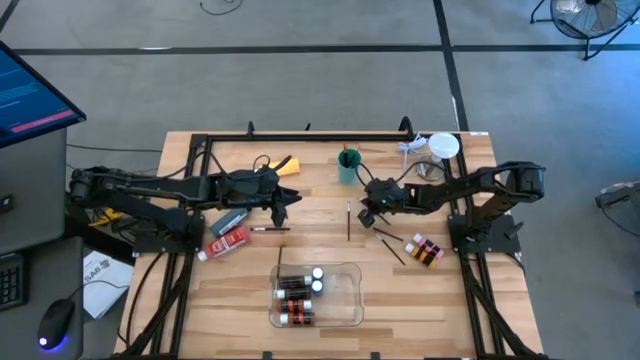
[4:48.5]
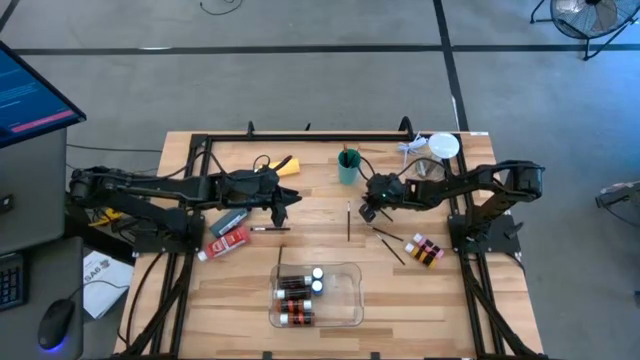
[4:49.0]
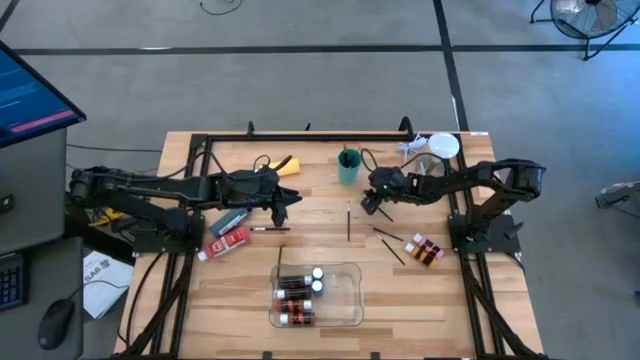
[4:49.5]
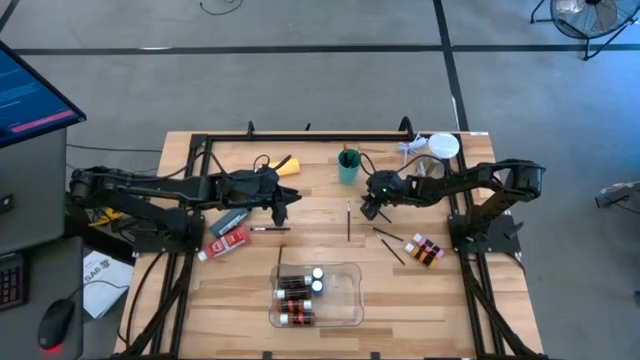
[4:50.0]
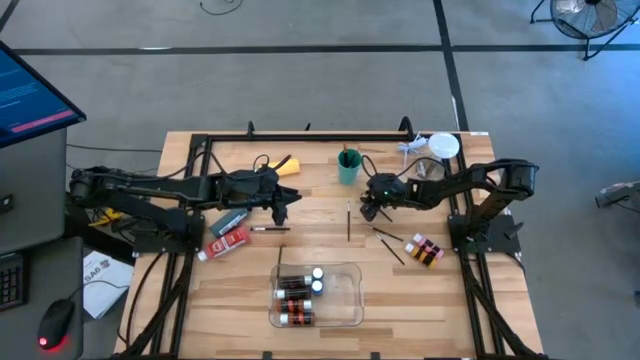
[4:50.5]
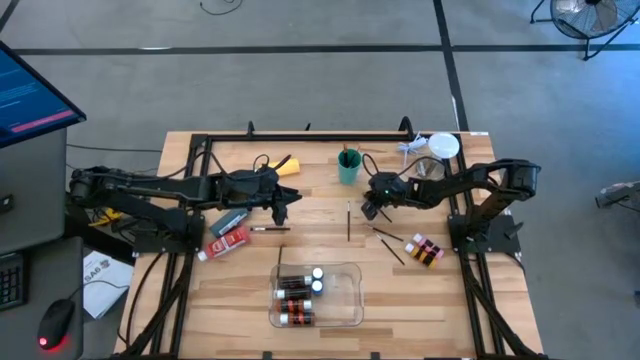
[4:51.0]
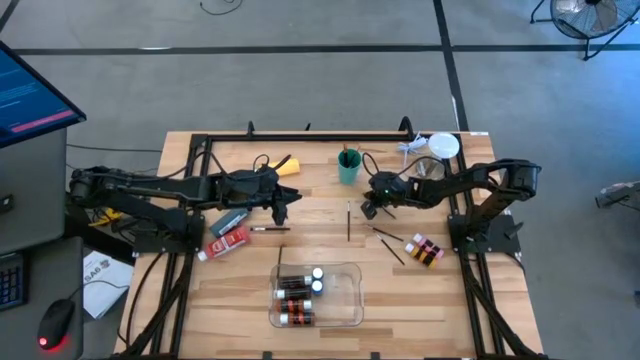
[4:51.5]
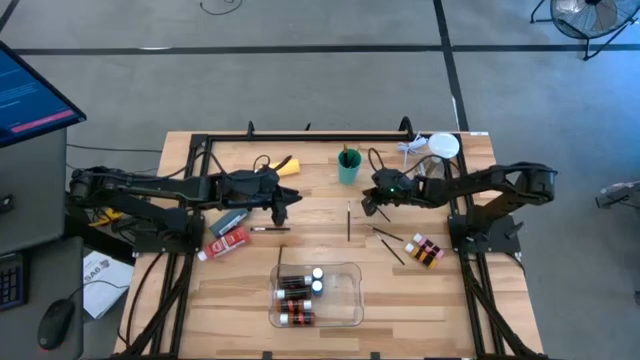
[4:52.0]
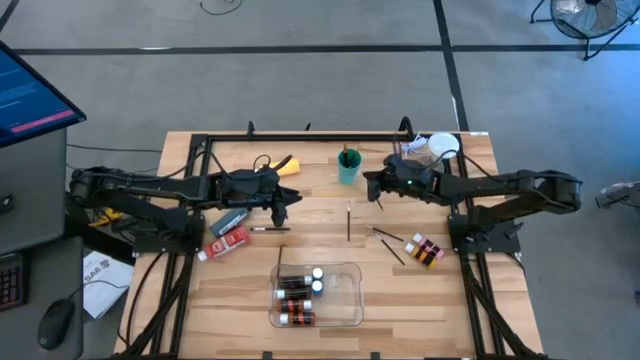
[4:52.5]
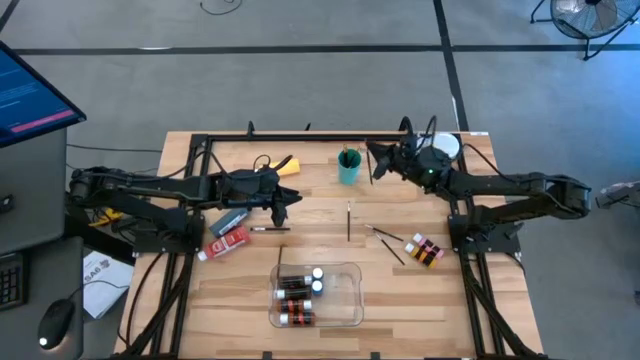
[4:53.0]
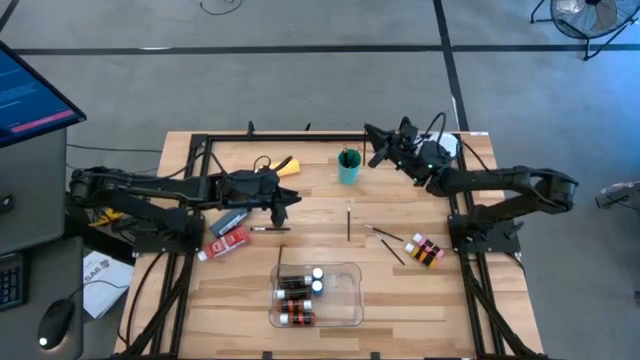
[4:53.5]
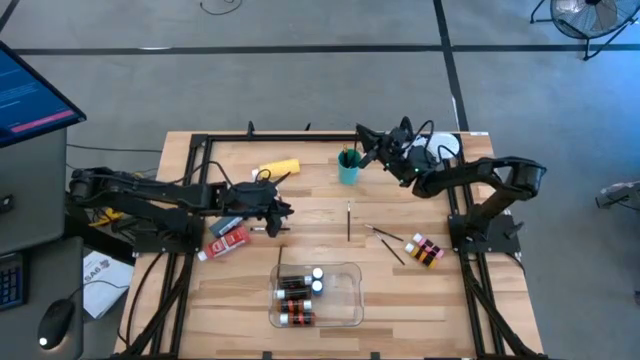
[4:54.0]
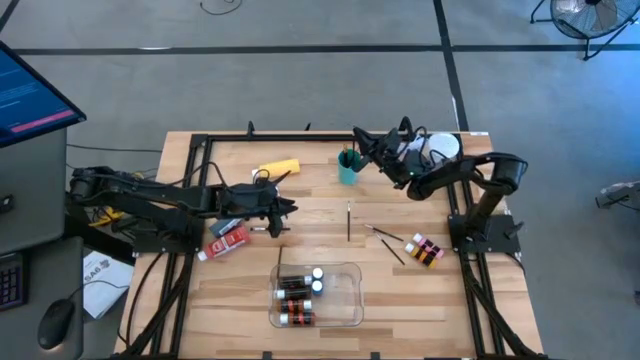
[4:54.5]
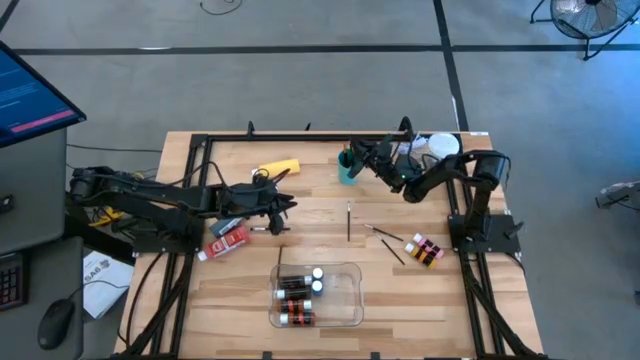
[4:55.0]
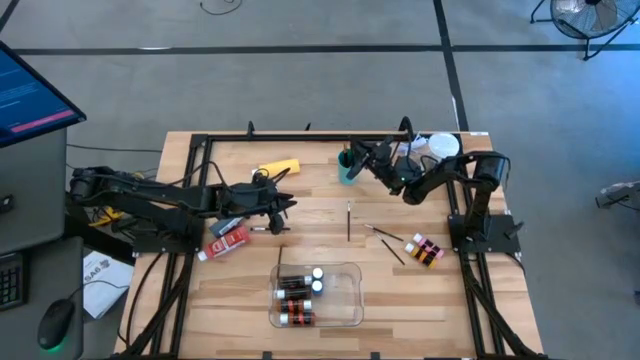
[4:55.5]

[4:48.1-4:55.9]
Task: Pick & Place Paint Supplies
Put the silver paint brush into the green cup

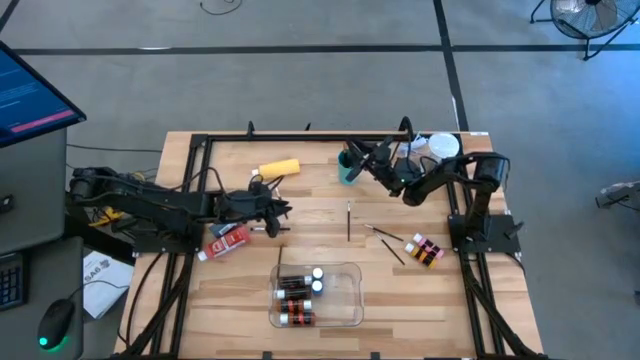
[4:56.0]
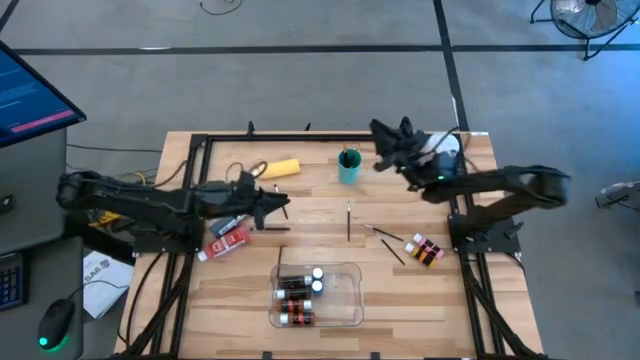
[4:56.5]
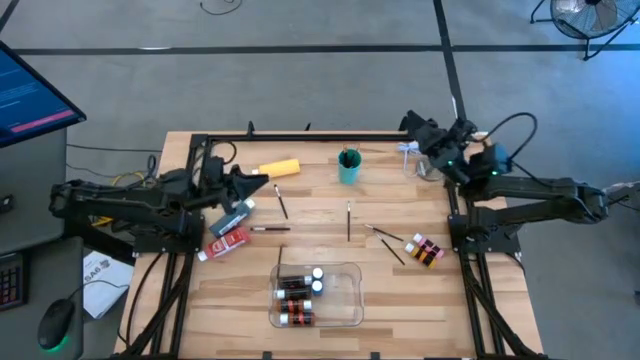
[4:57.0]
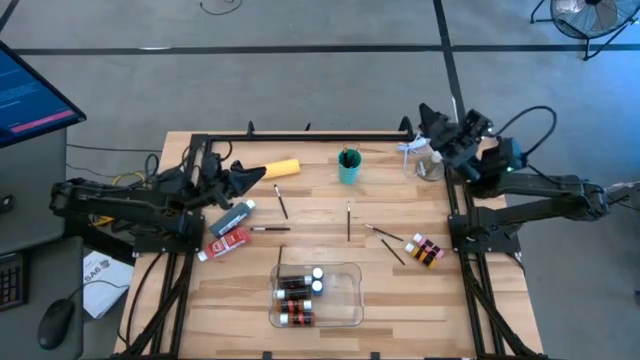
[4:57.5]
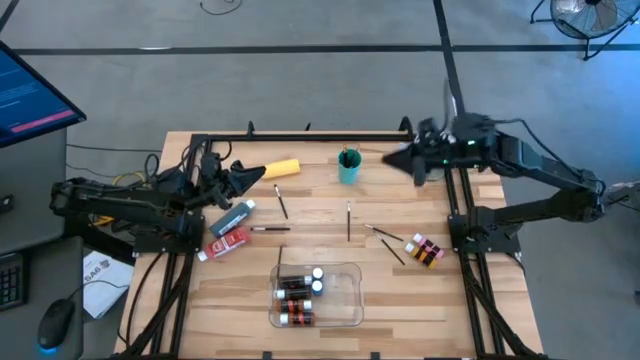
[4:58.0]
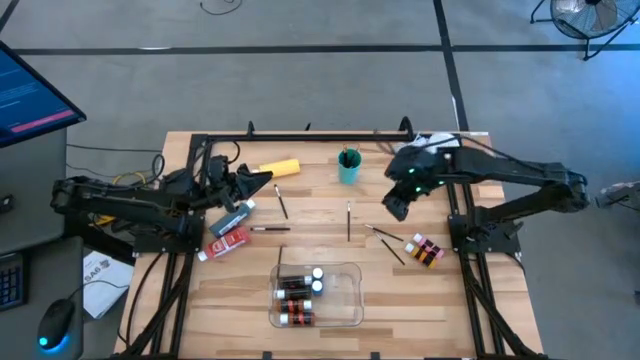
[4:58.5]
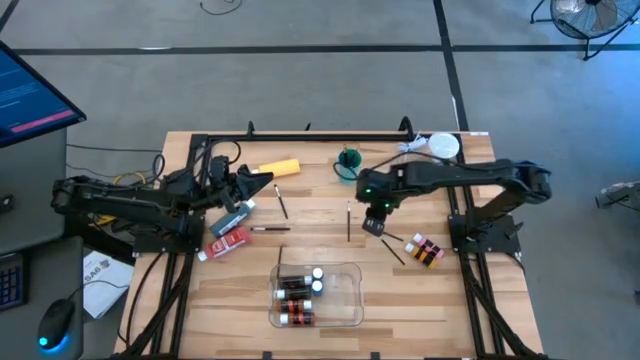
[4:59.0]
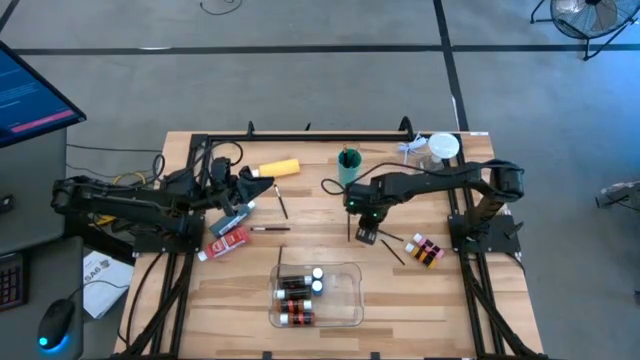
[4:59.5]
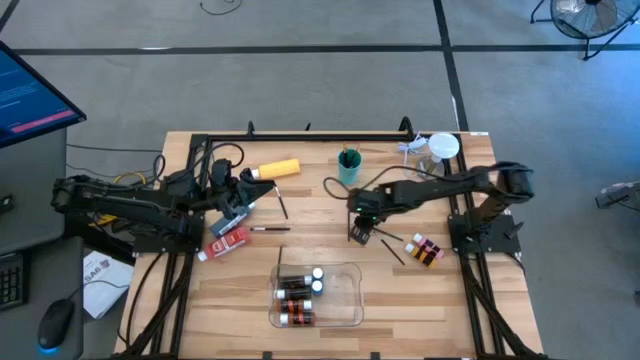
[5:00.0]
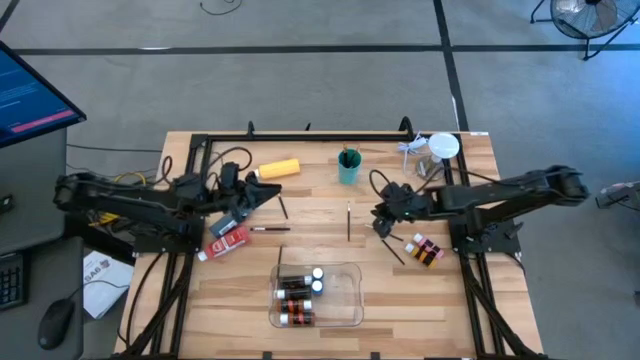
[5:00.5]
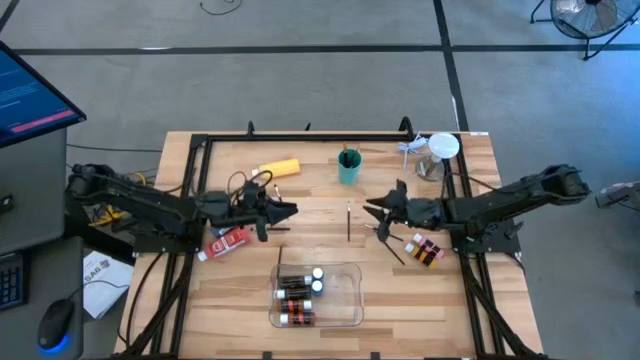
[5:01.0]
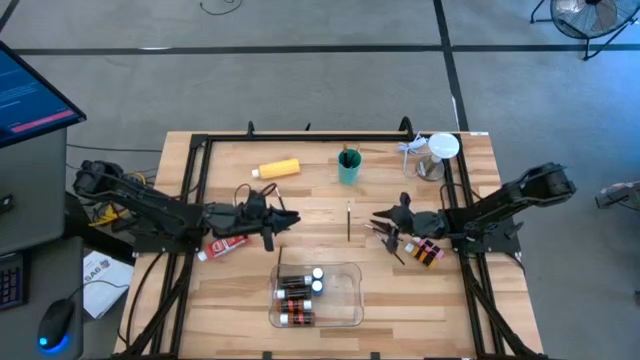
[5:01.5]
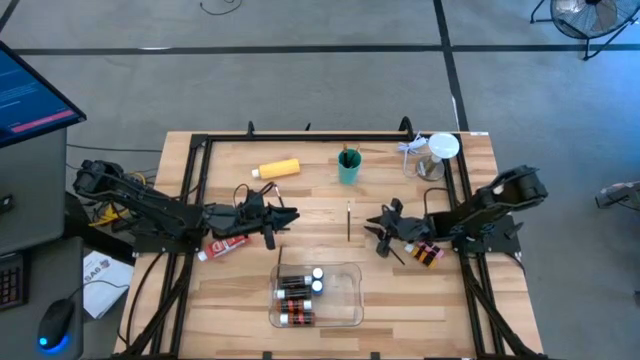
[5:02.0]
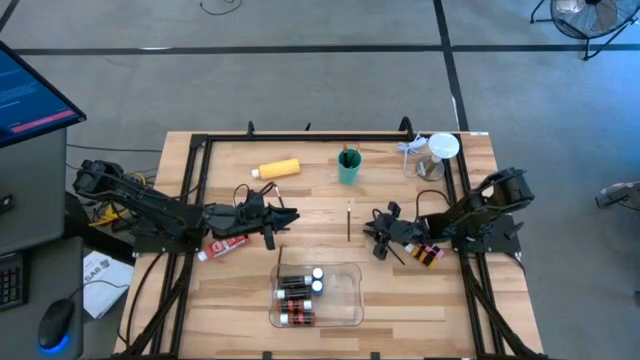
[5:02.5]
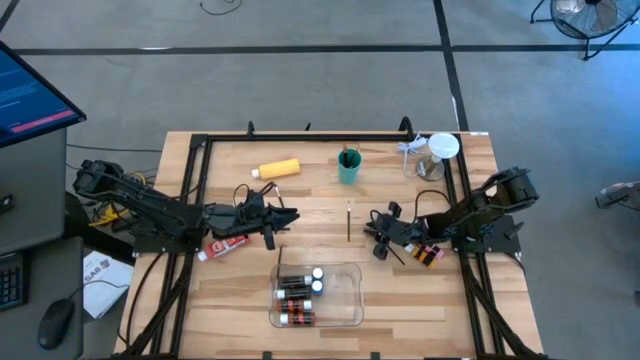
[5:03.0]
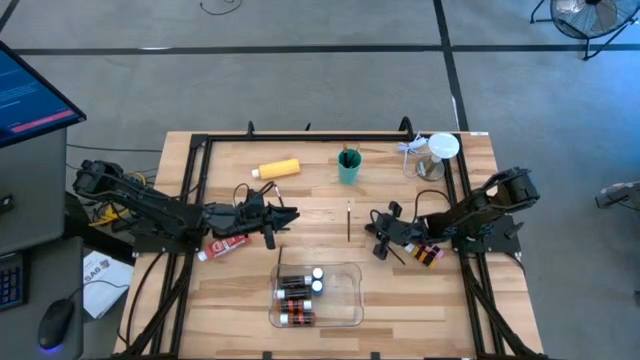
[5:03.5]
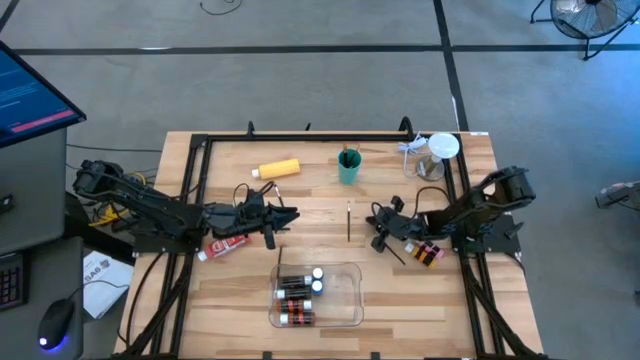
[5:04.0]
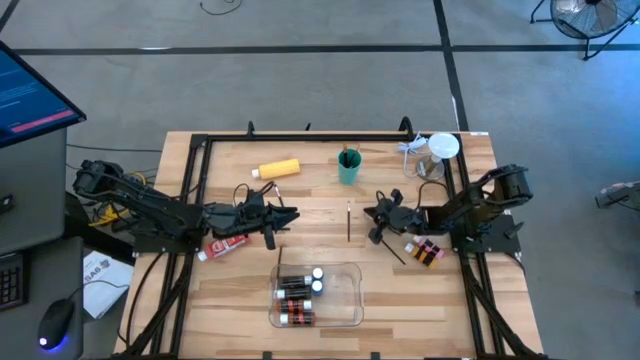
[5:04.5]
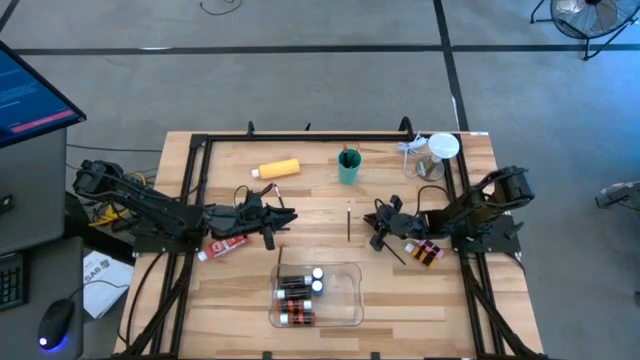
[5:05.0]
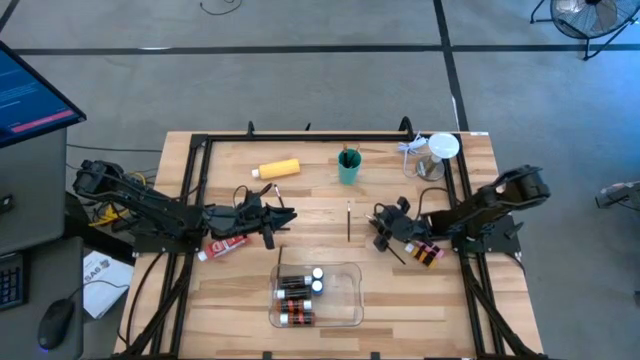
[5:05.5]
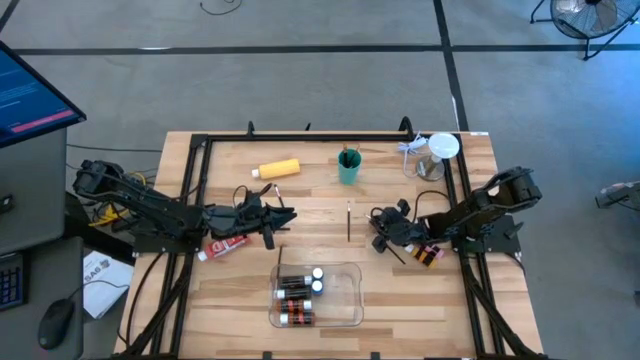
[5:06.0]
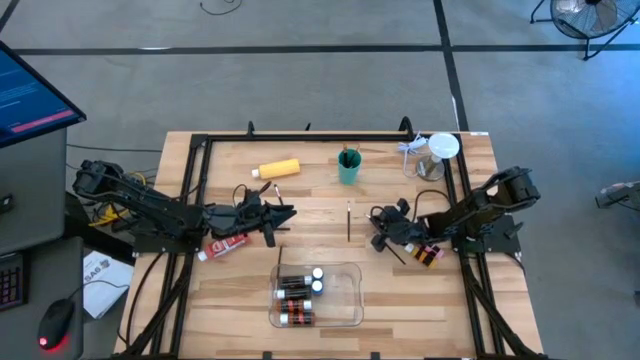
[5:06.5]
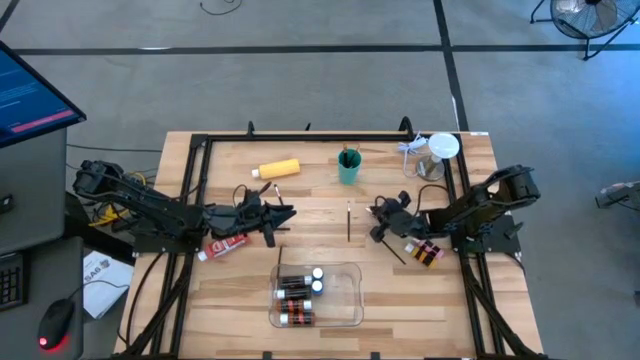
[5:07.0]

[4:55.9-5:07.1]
Put the silver paint brush into the green cup

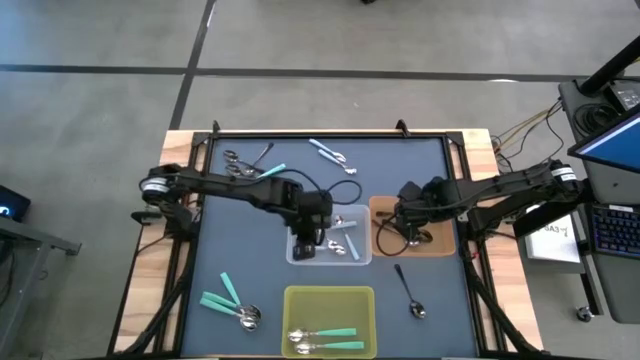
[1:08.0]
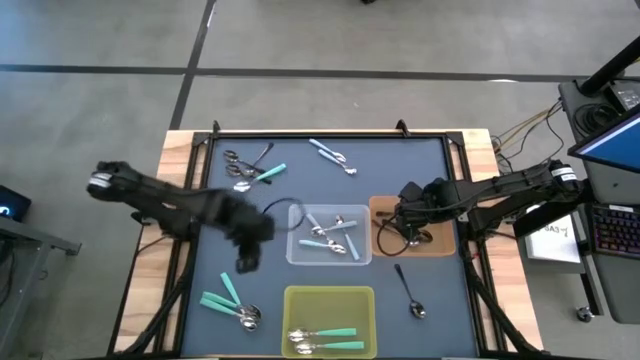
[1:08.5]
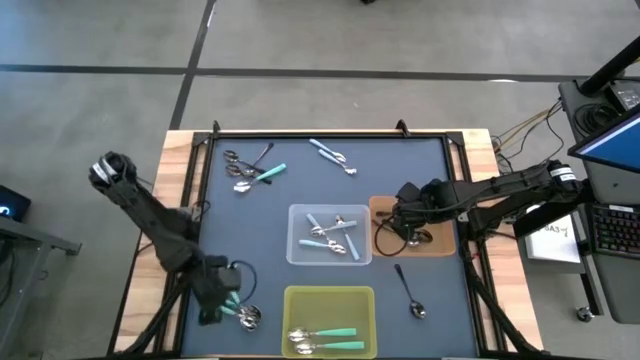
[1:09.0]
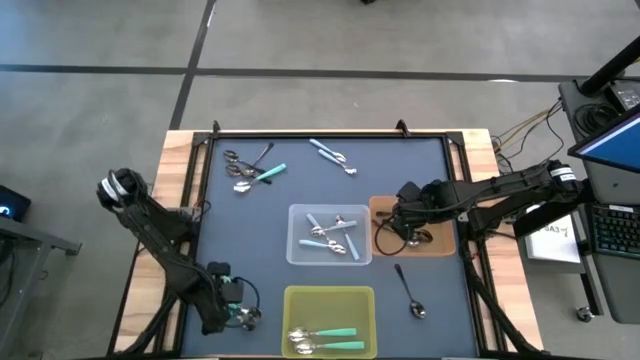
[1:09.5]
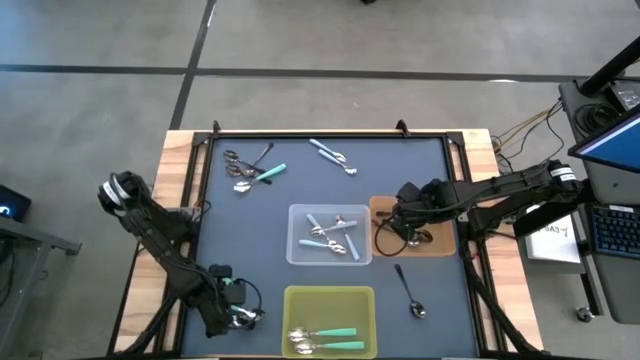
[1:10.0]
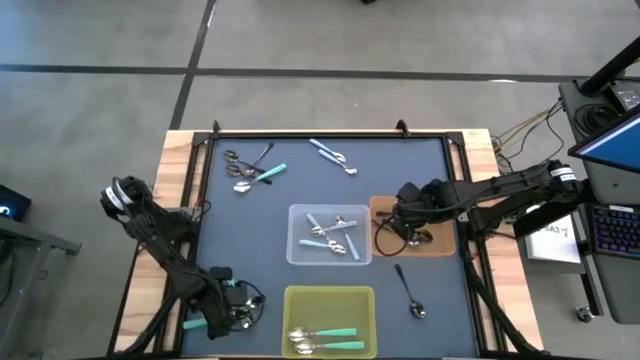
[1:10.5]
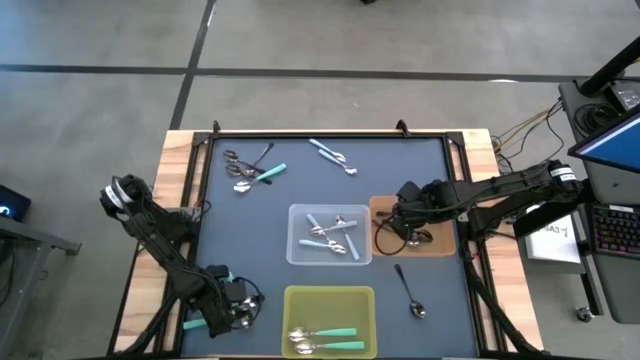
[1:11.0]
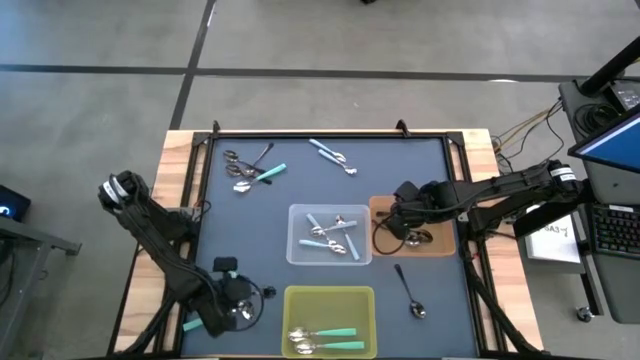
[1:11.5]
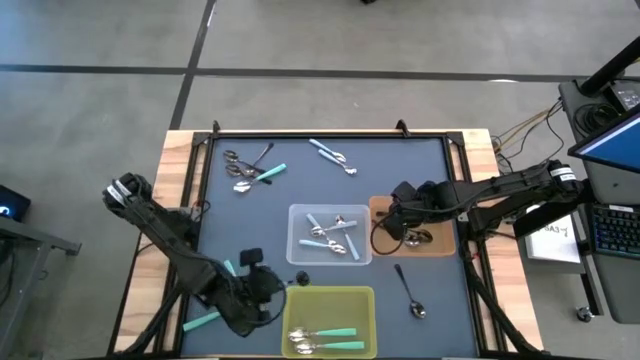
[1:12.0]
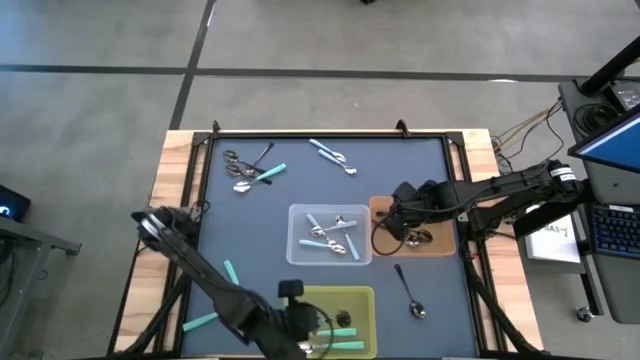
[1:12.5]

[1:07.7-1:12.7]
Task: Sort silverware by color (type)
Put the light green spoon into the yellow bin
